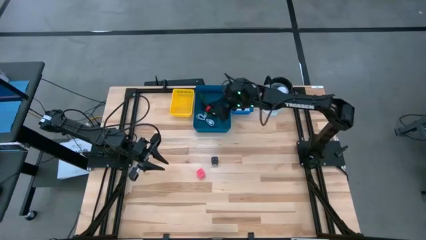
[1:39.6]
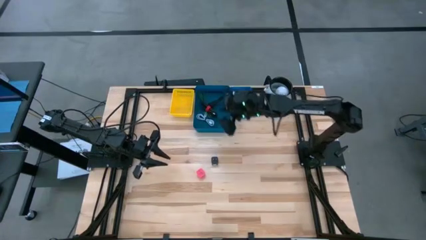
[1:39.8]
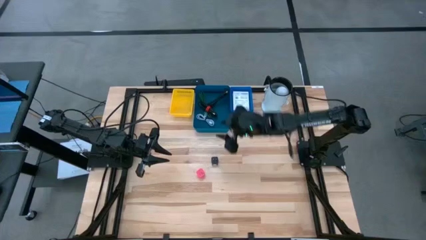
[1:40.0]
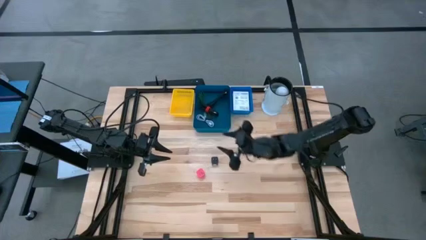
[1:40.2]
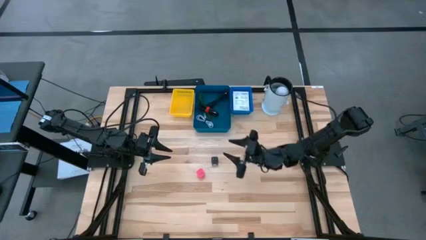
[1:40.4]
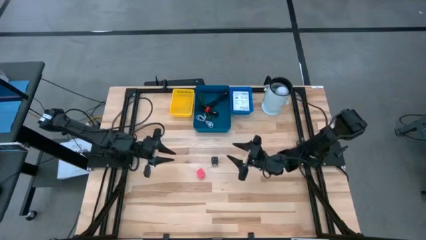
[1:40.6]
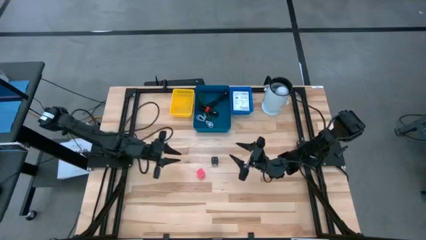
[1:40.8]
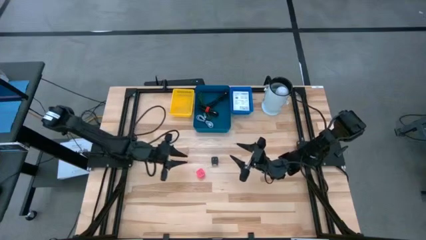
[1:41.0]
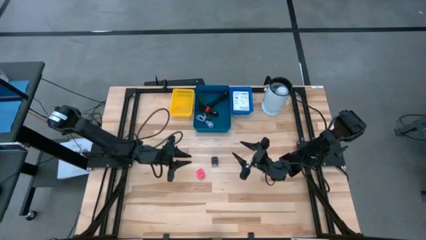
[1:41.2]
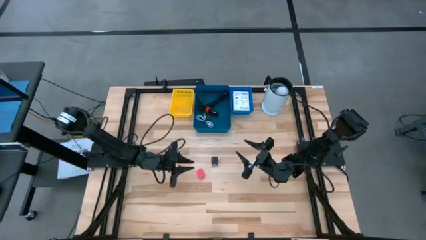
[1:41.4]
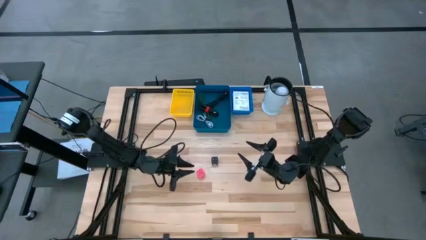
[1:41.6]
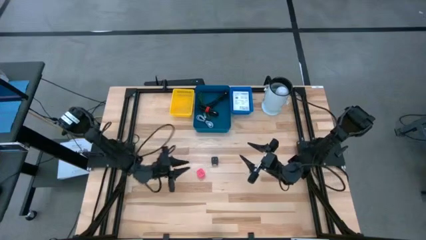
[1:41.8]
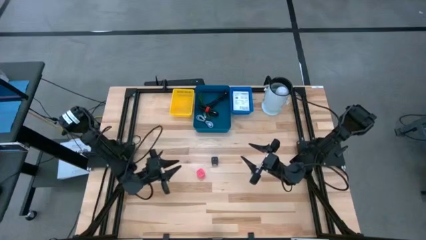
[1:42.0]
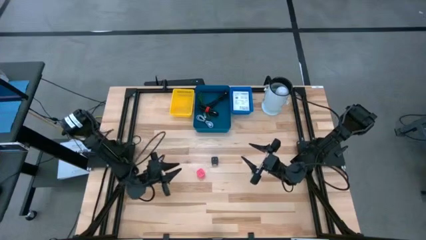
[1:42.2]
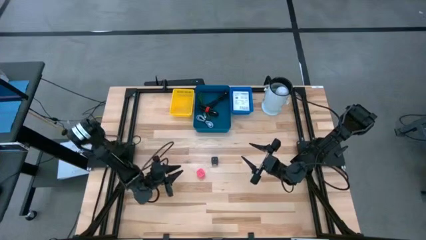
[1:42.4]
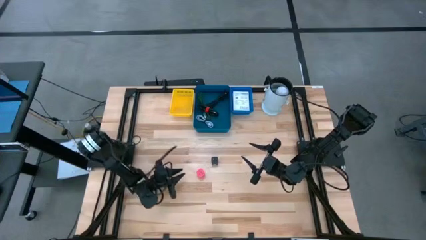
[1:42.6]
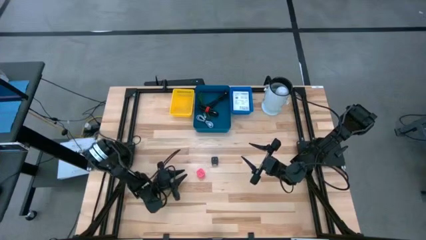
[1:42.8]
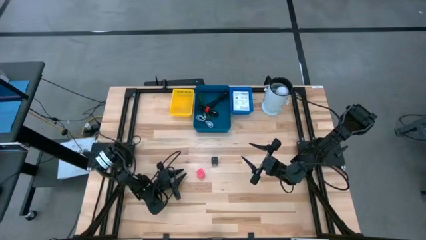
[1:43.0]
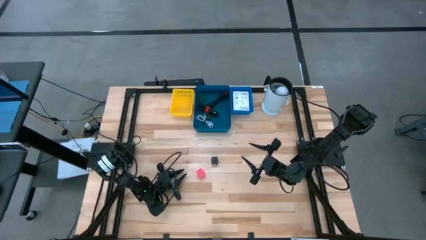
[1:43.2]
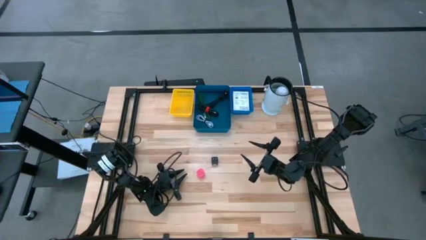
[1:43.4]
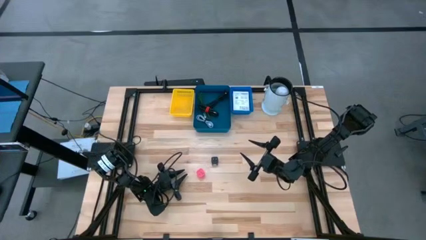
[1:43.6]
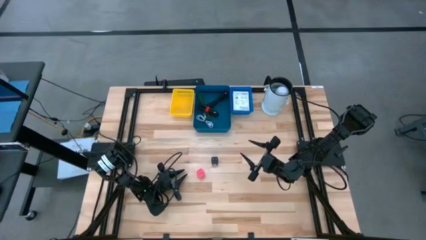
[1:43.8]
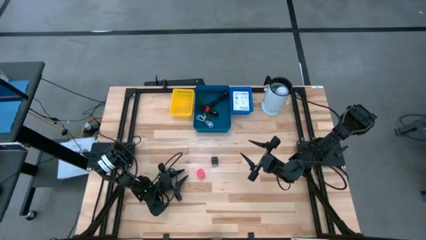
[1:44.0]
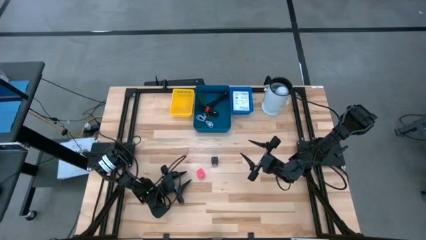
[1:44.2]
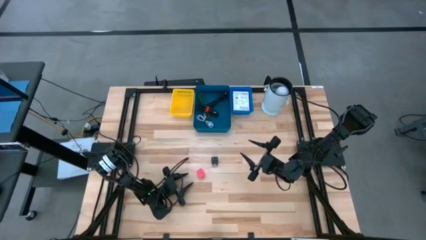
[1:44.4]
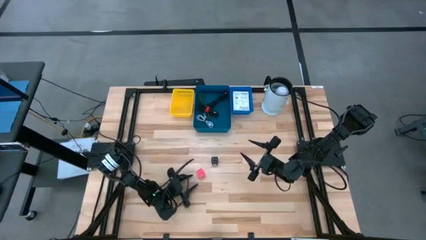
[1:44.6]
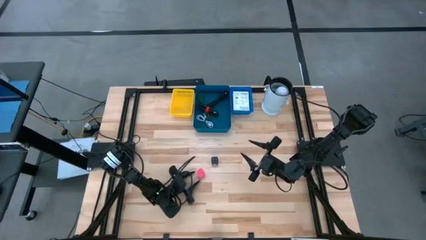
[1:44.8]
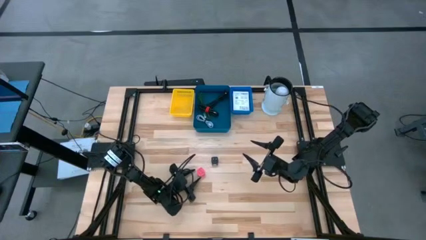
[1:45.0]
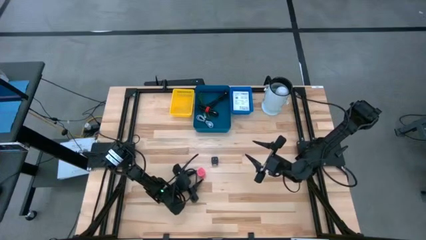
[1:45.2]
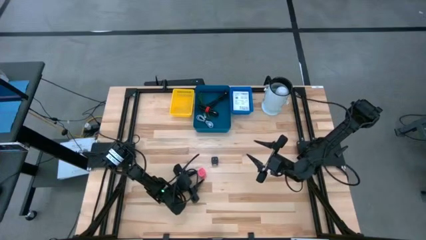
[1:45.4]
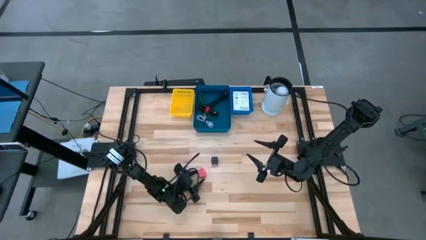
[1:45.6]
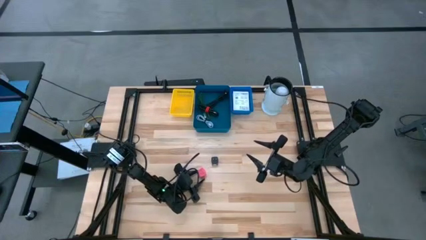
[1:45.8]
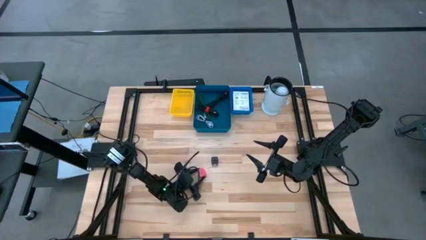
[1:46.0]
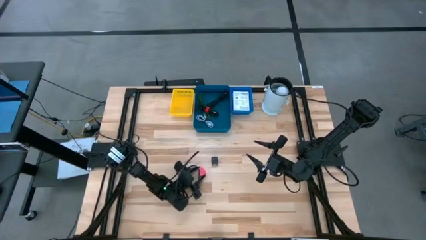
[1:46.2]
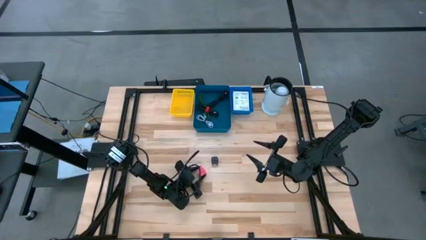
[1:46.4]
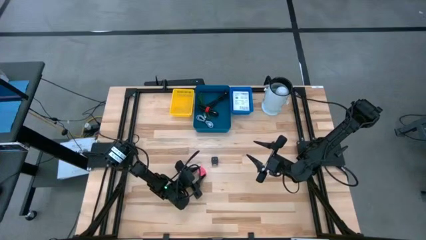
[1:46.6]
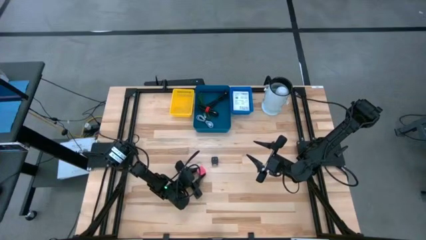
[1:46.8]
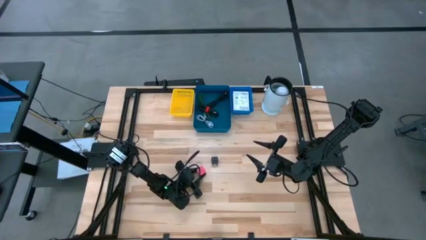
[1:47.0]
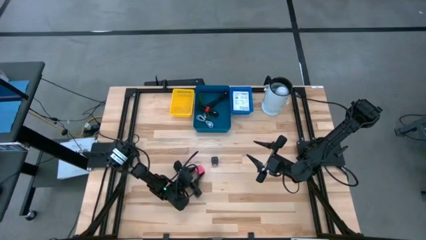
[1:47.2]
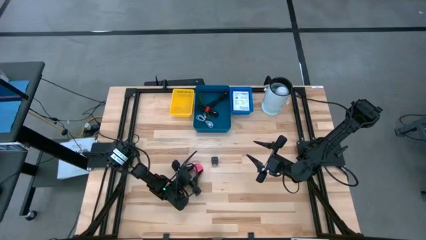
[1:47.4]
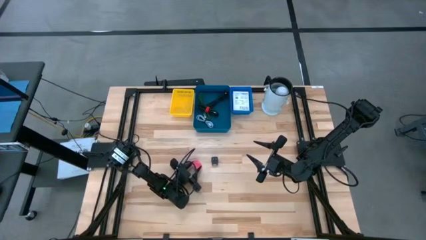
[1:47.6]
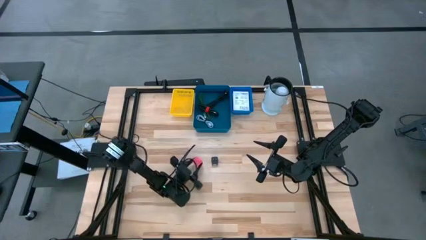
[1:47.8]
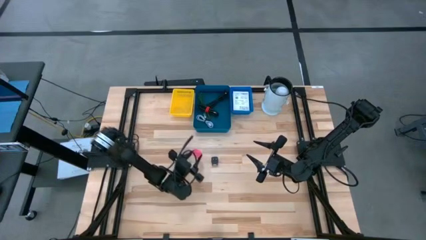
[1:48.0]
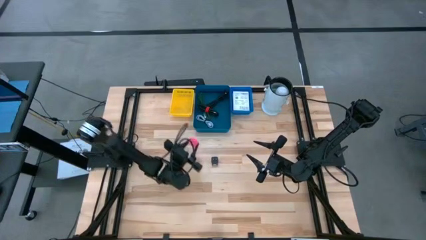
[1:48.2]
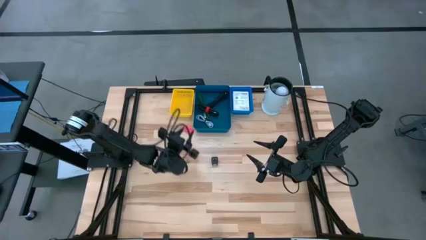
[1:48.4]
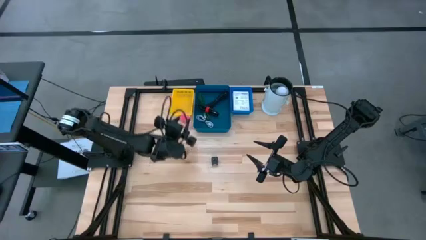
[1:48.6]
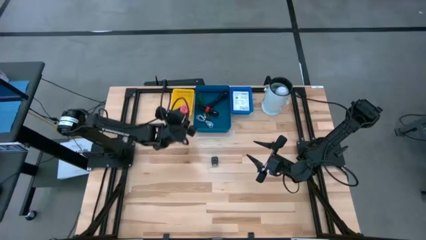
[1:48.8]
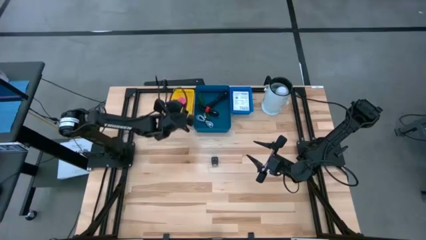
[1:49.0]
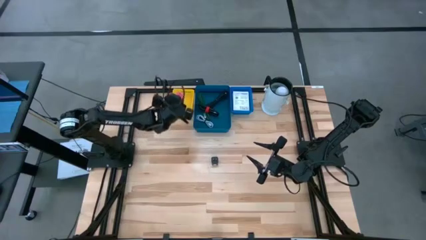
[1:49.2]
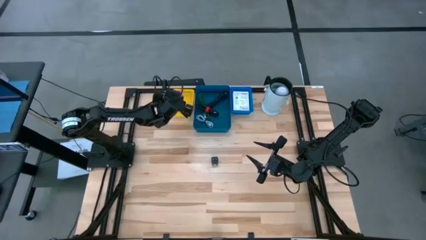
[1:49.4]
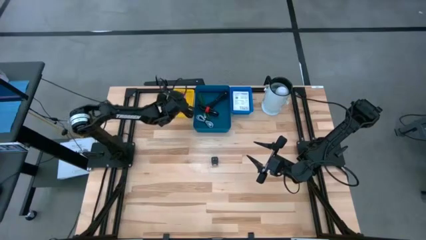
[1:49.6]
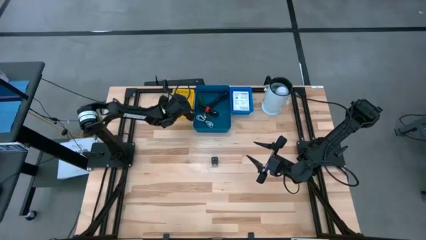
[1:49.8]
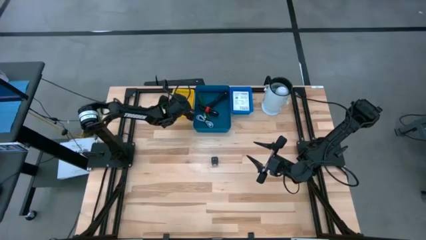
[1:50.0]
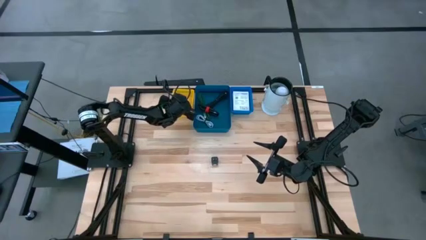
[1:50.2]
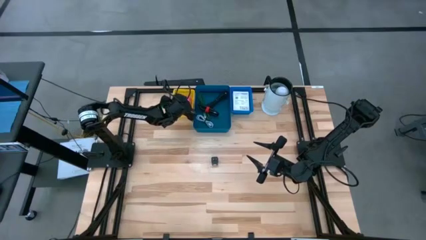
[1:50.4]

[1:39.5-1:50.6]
Task: Pick and place items into bin
Put the pink charger adapter into the yellow bin

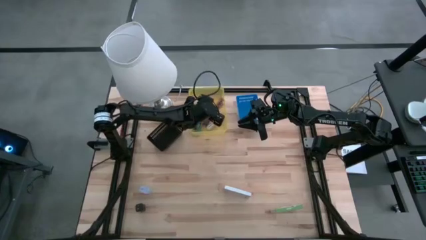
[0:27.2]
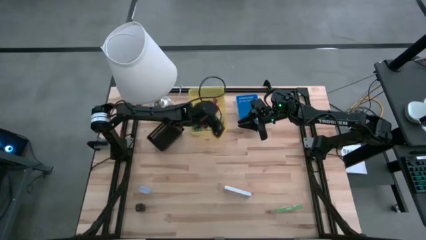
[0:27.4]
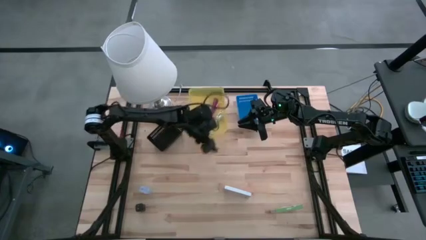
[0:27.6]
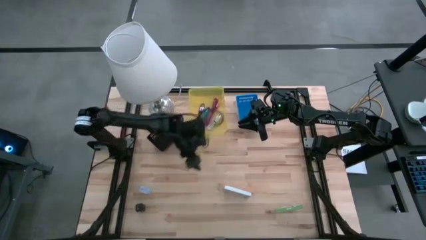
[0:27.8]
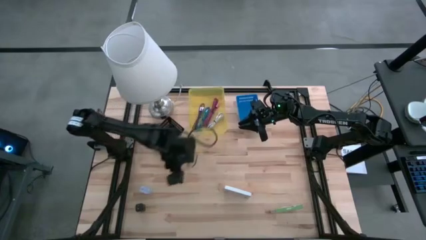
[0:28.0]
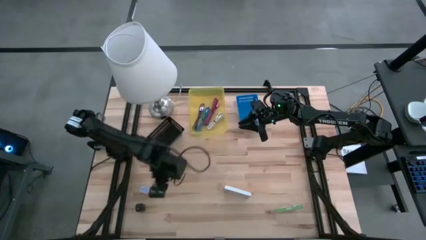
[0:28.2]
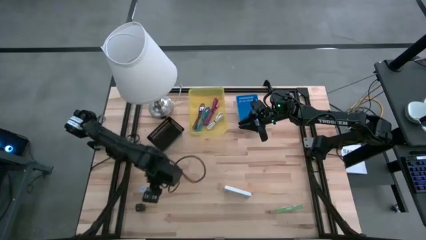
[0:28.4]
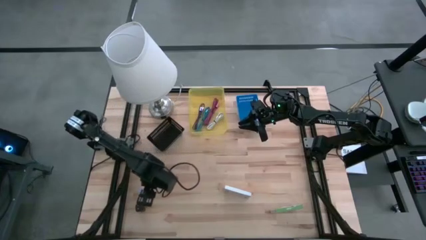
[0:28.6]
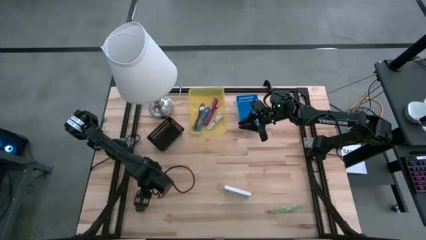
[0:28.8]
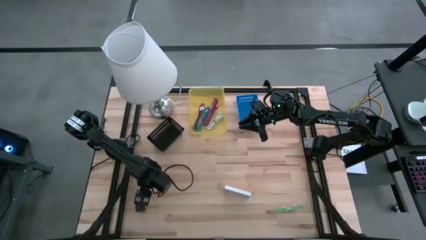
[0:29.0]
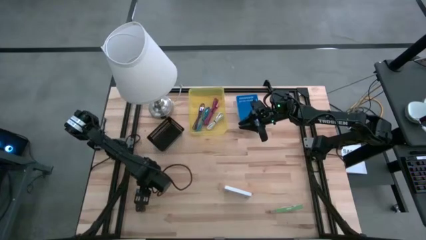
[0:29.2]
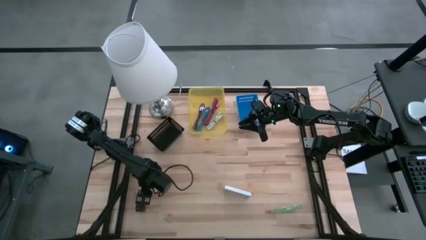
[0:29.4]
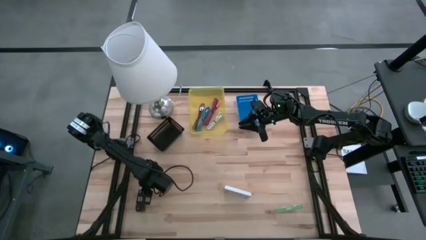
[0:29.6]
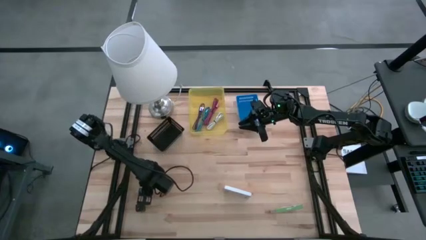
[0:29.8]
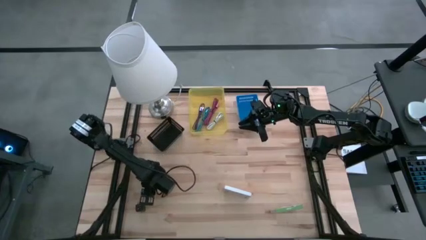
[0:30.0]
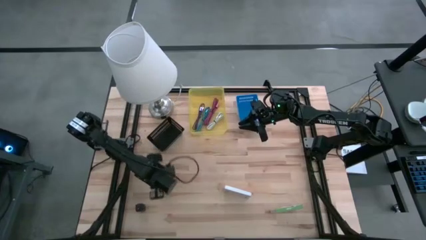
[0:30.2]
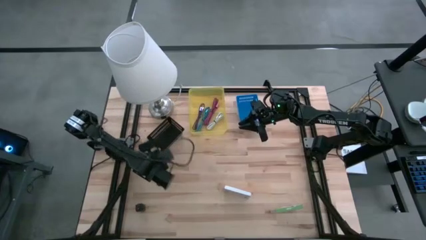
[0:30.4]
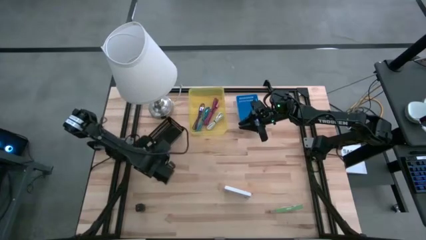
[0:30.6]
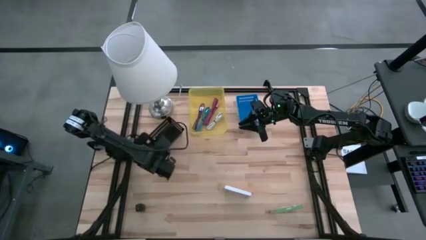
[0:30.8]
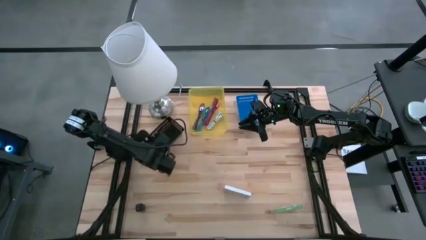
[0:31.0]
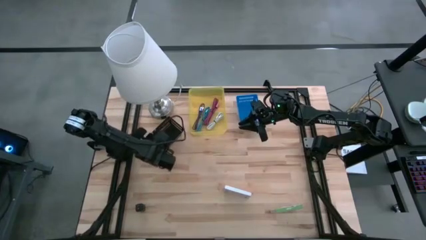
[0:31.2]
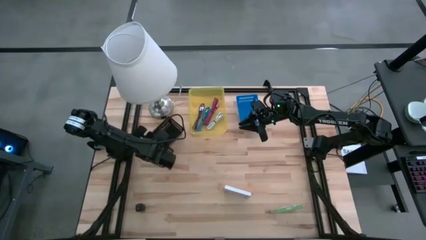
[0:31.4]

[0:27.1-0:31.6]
Task: Pick and place items into bin
Put the white charger adapter into the black bin
